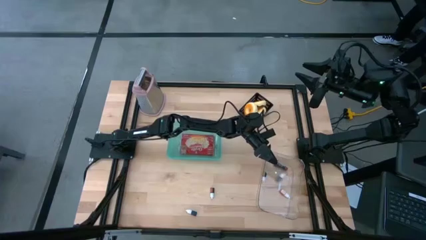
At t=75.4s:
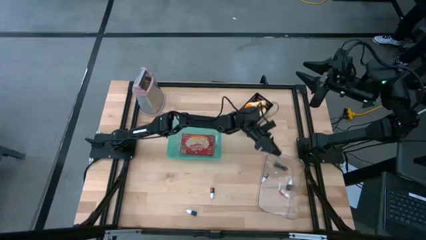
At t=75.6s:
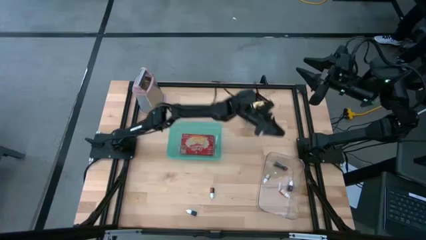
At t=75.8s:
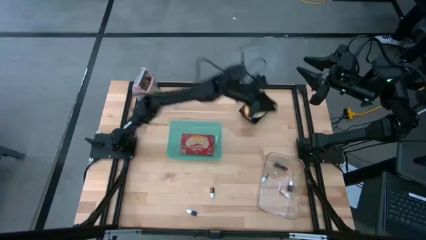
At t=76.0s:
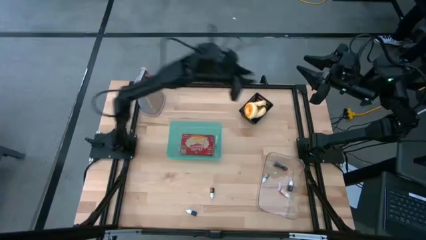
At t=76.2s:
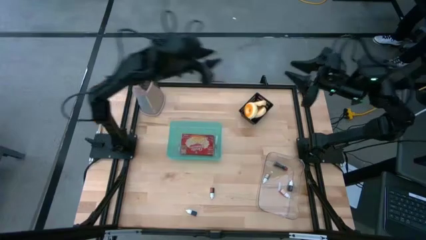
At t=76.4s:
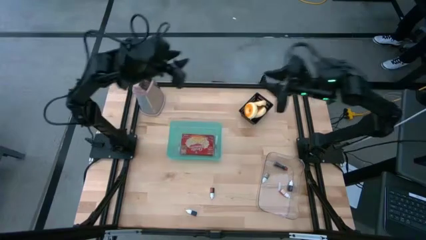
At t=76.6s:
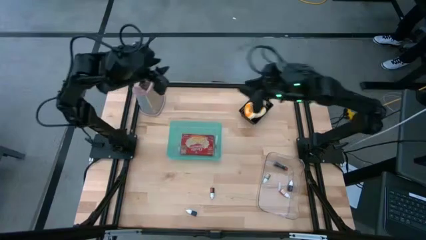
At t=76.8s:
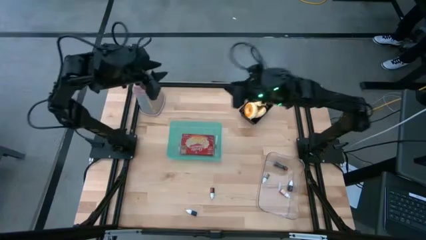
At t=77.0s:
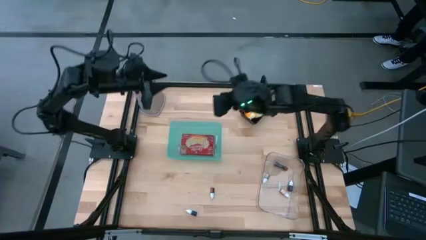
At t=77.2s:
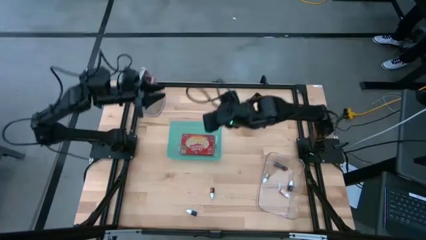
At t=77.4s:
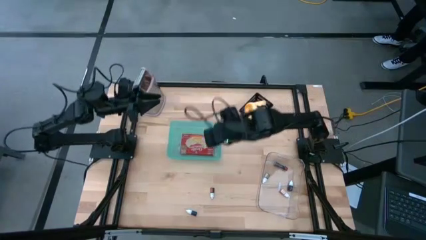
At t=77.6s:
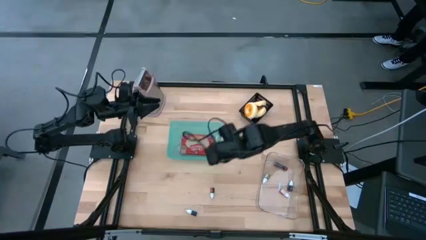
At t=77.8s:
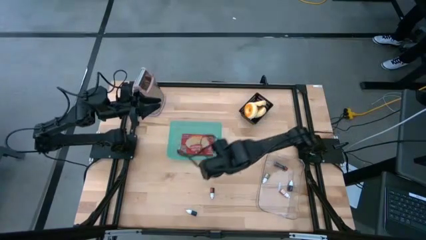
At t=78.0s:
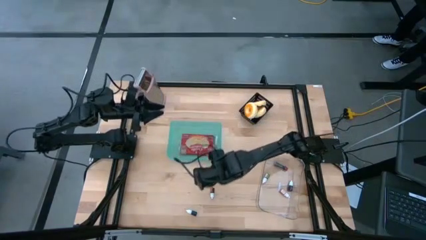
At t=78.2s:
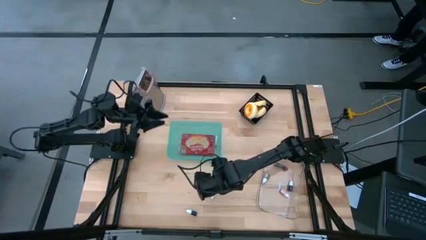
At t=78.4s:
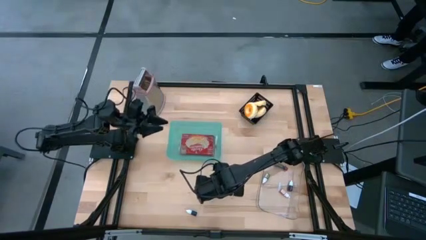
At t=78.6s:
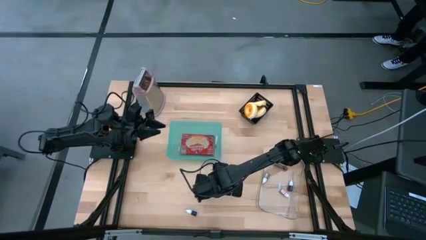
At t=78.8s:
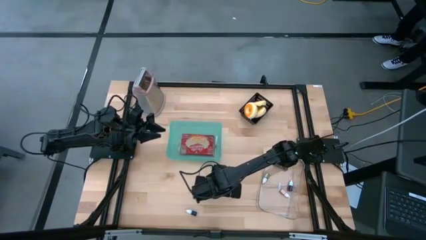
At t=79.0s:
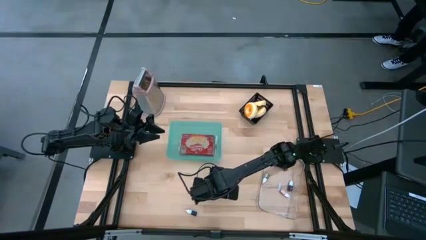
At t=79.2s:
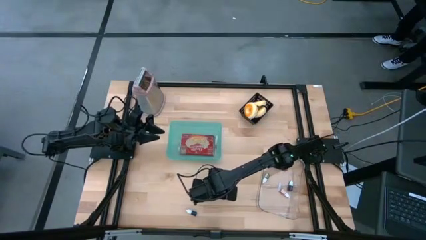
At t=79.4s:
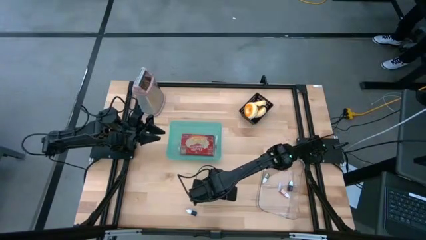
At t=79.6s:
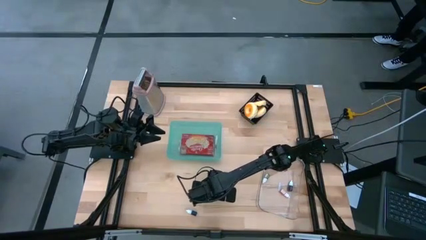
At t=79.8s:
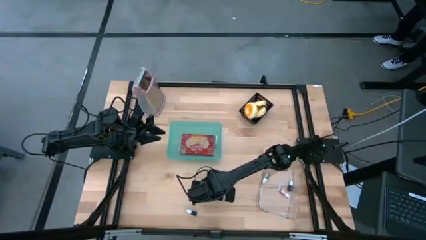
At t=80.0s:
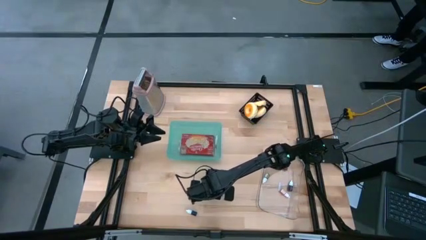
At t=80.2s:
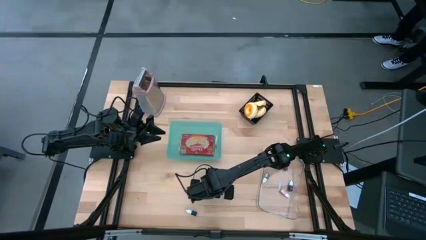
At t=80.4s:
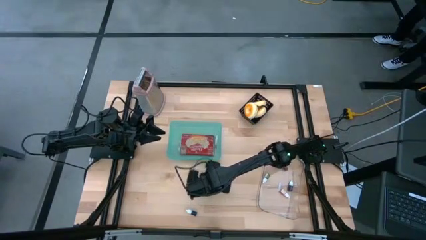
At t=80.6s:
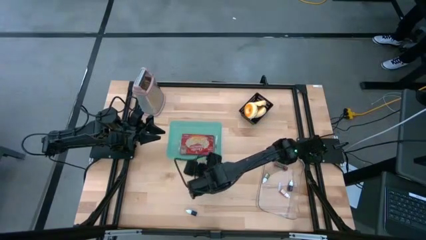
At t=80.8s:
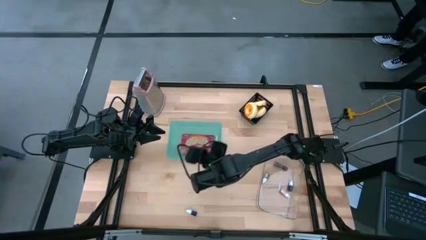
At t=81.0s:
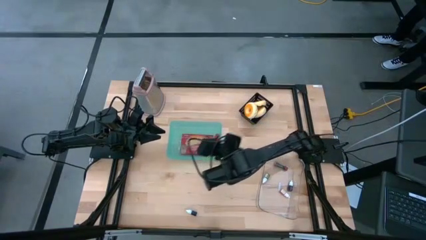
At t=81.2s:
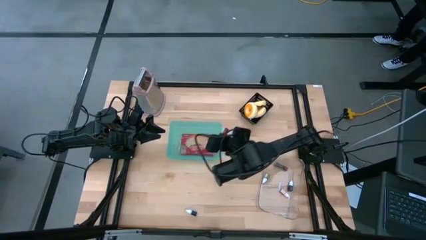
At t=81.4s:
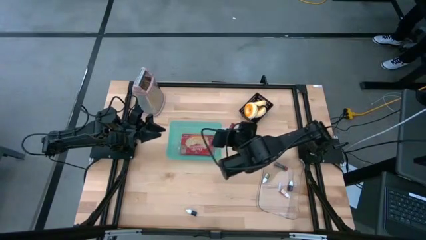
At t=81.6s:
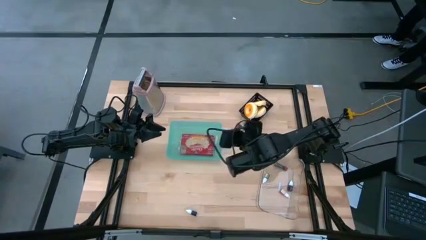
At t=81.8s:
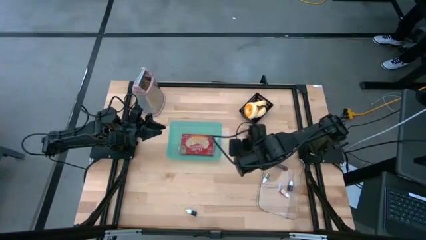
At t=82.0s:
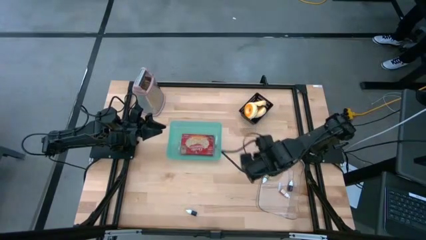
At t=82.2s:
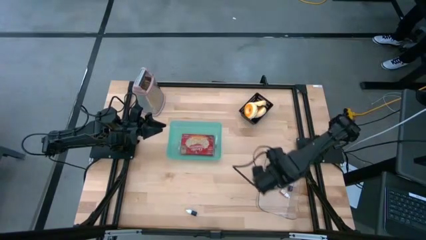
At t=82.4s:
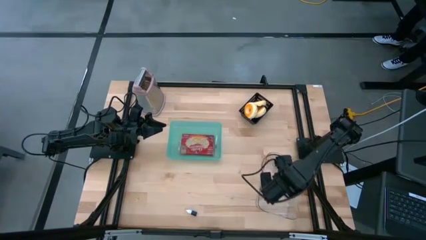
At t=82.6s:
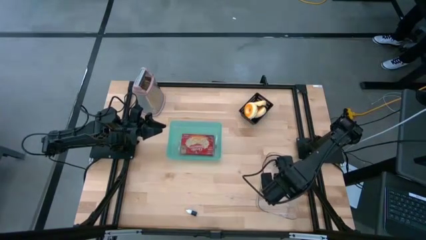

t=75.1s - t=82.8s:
Put the red food coloring bottle into the transparent bin

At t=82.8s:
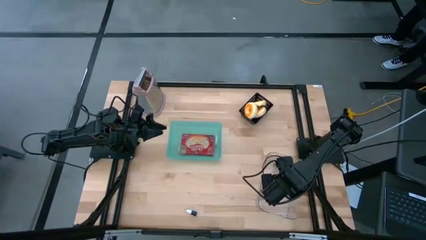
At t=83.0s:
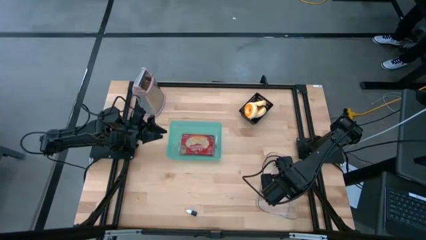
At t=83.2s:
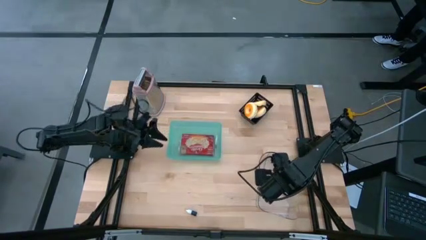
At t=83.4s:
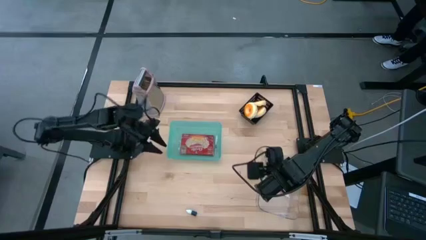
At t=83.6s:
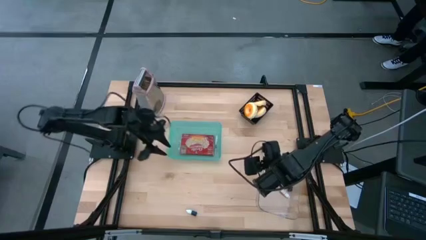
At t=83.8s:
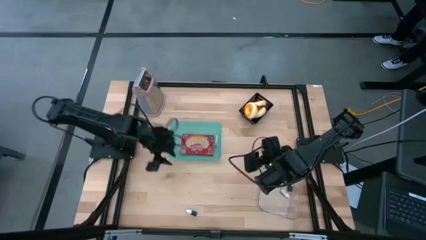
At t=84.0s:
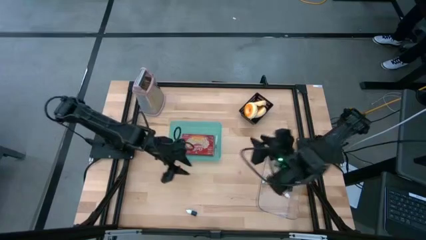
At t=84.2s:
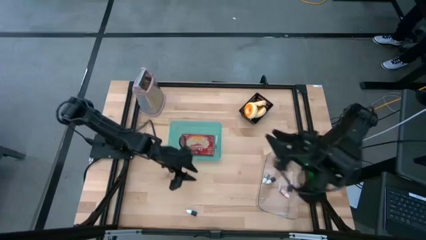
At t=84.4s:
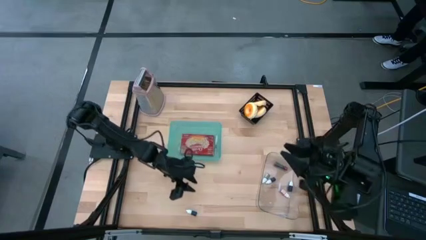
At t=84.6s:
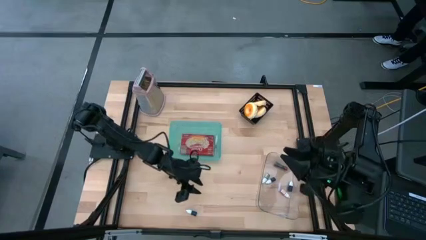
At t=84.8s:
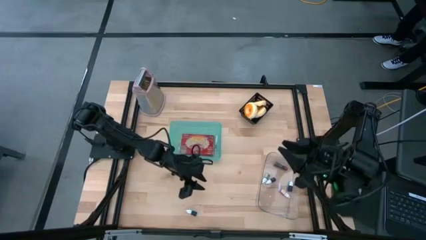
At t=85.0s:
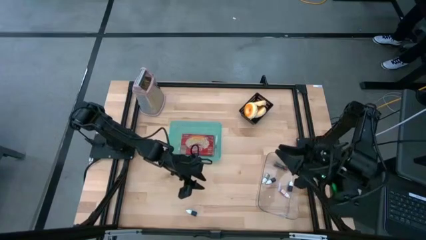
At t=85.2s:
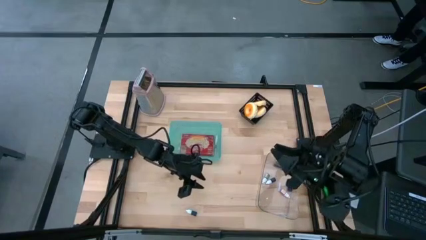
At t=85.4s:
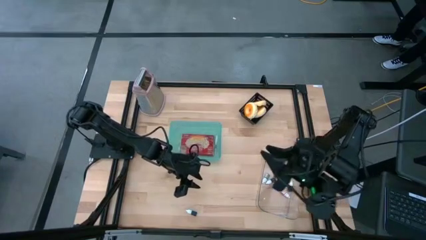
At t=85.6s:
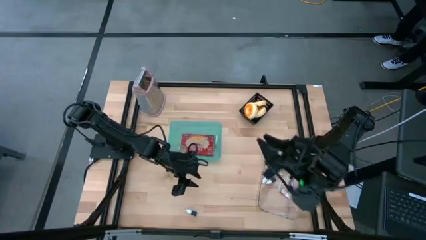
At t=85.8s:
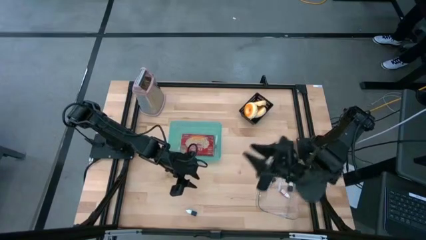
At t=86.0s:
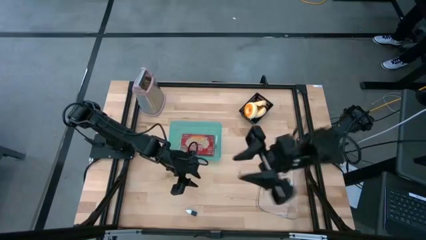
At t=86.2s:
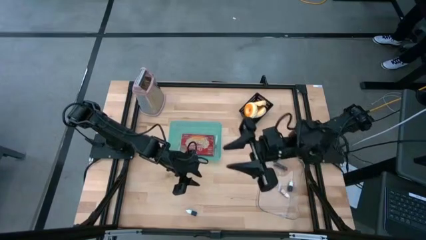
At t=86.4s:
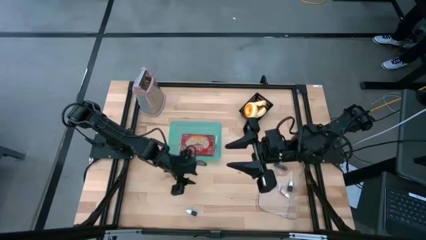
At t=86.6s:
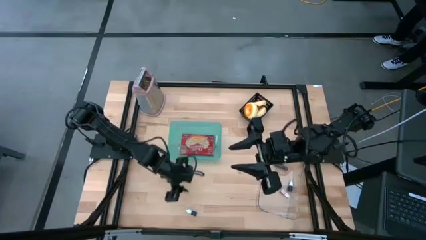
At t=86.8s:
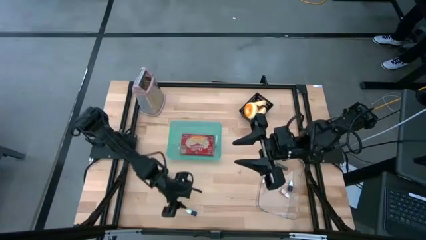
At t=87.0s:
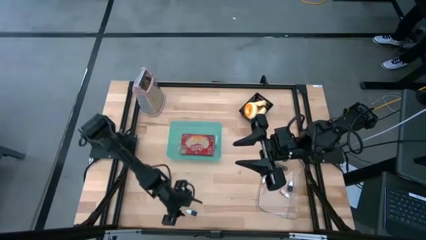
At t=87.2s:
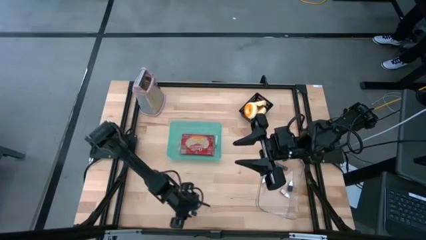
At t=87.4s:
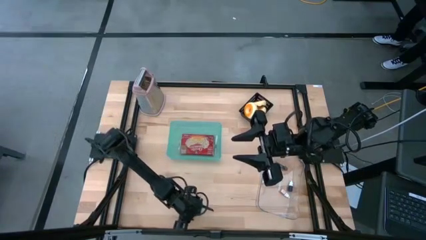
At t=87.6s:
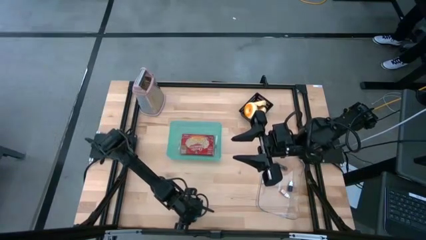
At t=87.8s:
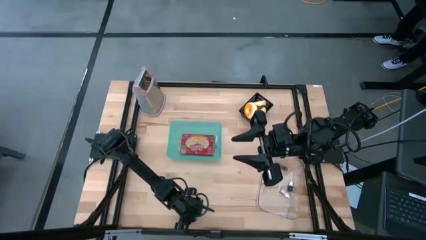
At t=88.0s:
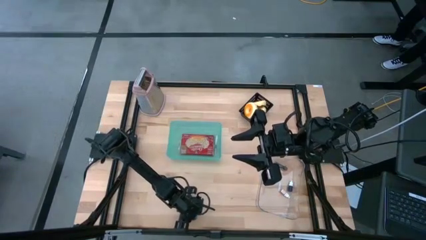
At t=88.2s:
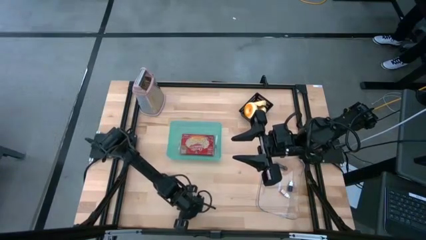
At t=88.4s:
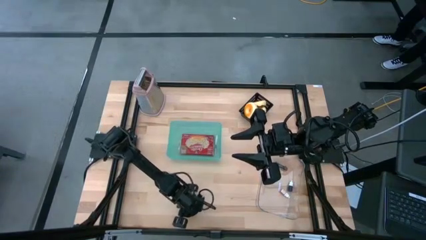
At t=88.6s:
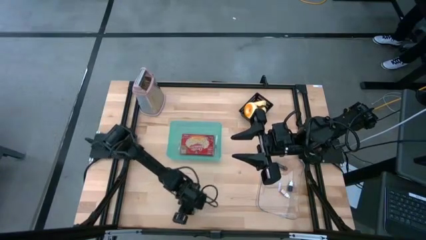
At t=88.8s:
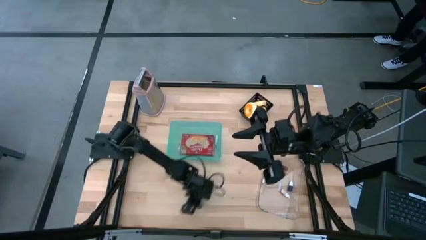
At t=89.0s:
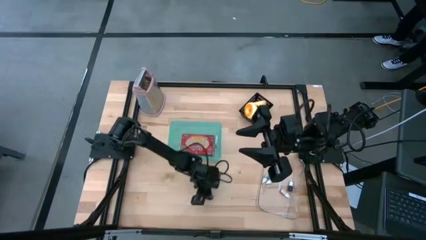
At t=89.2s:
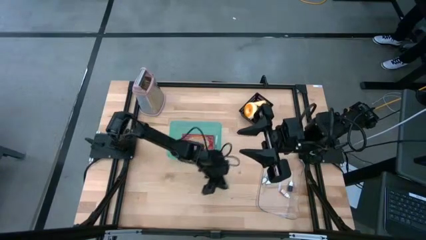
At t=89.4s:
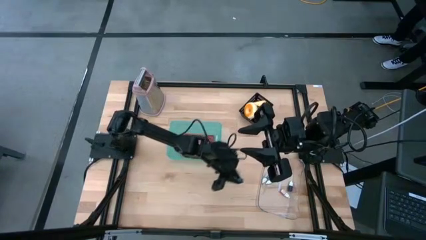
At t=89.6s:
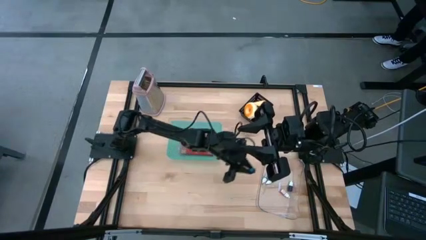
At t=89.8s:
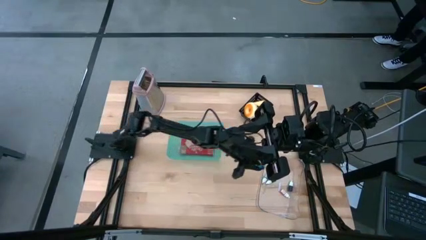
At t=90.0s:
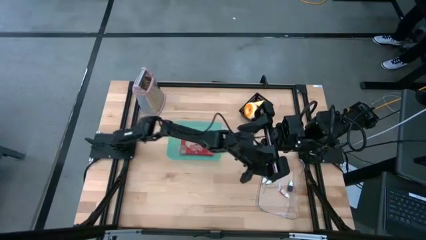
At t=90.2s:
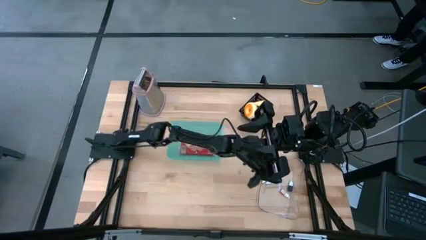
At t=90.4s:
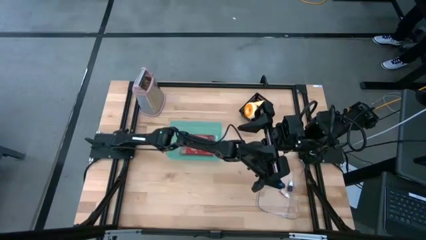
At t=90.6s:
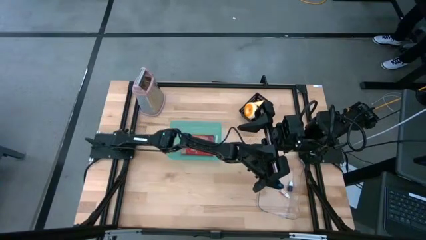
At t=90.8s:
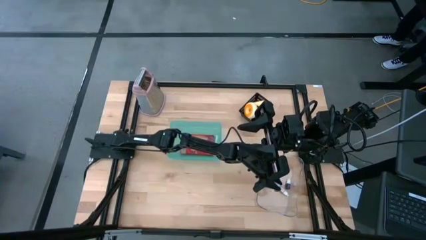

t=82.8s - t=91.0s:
Put the blue food coloring bottle into the transparent bin
